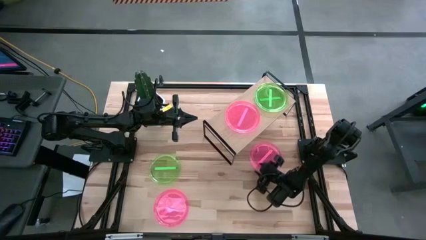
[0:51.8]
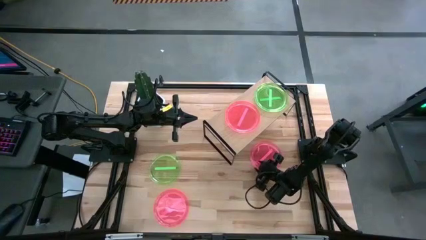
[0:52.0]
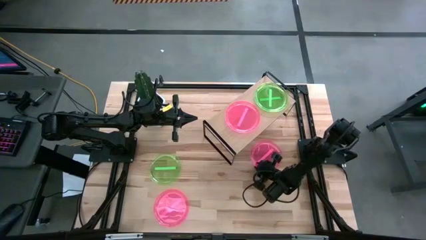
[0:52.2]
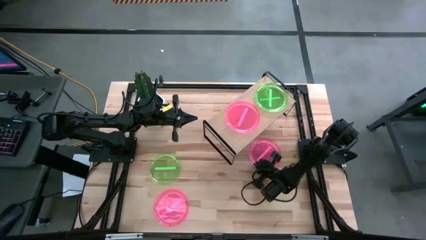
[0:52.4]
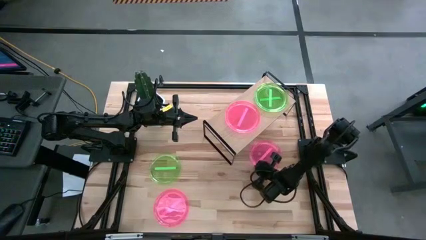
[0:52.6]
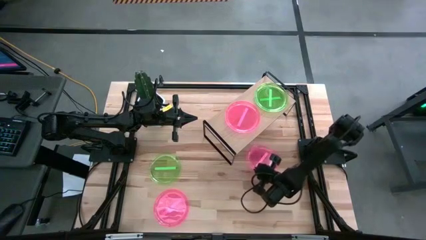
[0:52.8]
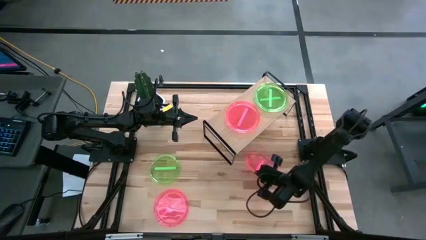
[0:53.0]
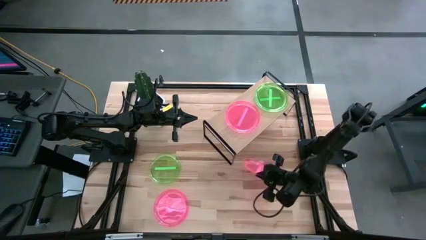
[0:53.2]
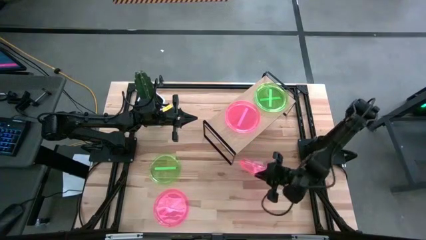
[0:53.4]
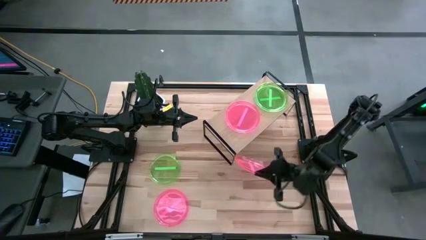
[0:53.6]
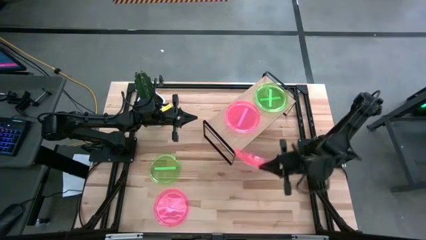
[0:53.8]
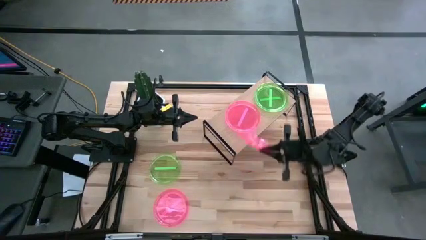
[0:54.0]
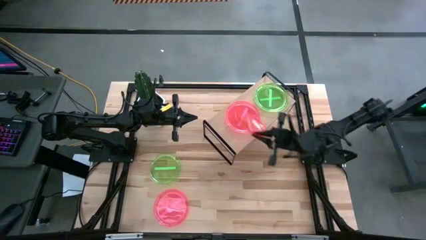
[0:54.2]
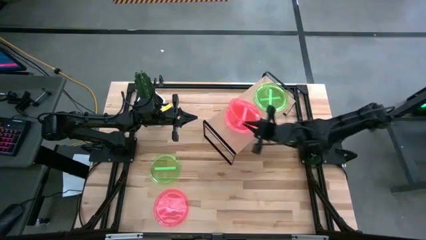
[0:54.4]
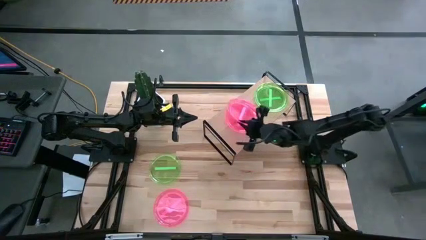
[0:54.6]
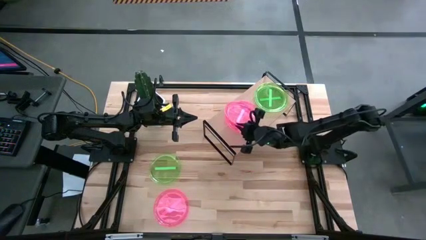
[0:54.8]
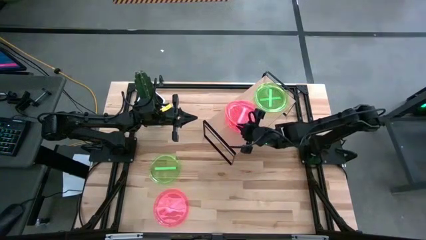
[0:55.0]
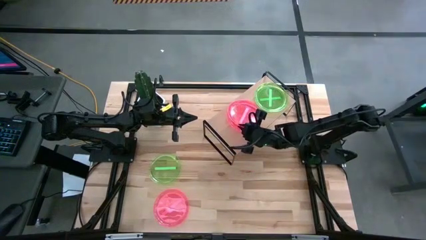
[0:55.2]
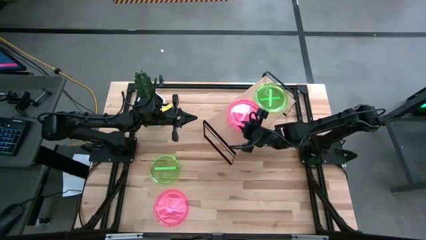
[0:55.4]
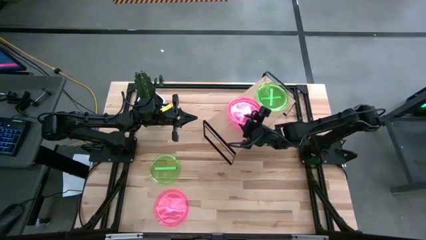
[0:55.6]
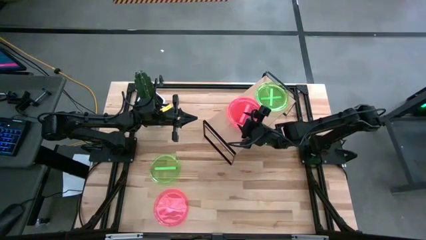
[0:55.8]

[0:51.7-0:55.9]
Task: Place and stack plates onto a shelf
Stack the right pink plate on top of the pink plate on the shelf

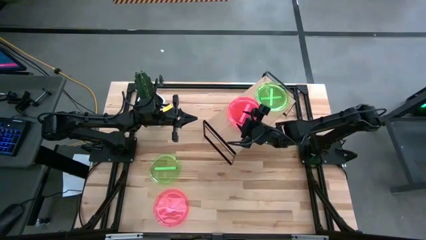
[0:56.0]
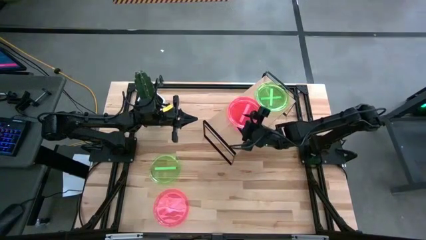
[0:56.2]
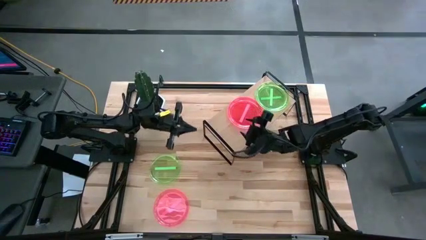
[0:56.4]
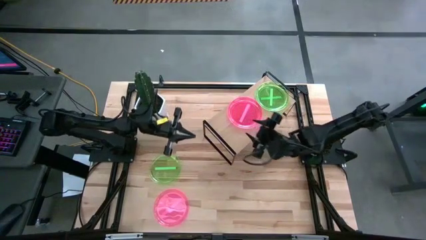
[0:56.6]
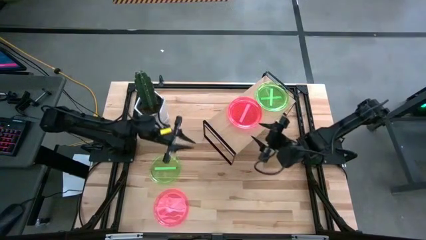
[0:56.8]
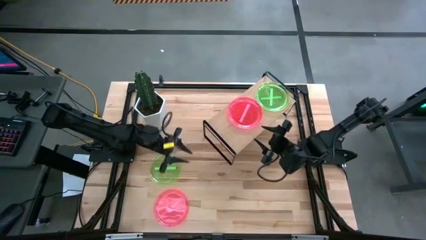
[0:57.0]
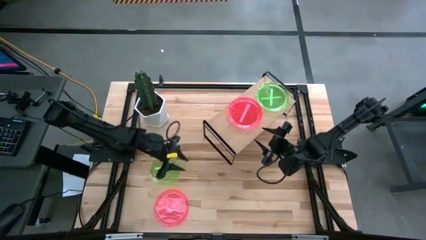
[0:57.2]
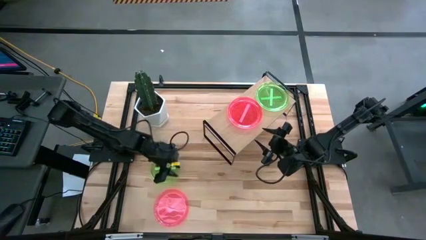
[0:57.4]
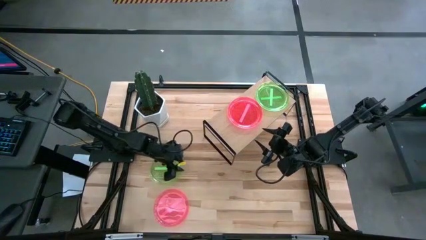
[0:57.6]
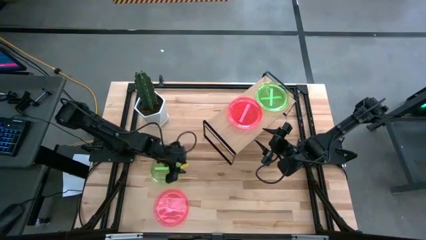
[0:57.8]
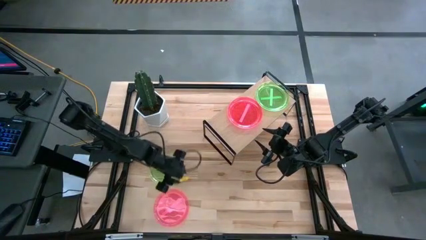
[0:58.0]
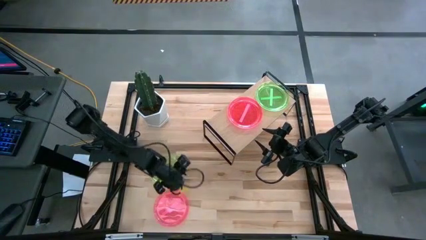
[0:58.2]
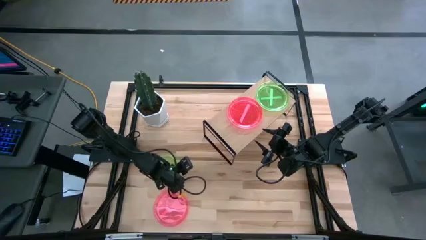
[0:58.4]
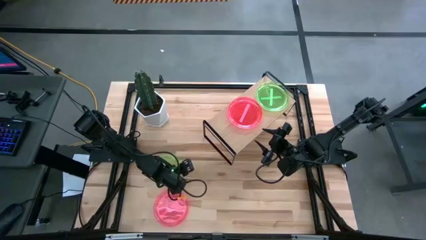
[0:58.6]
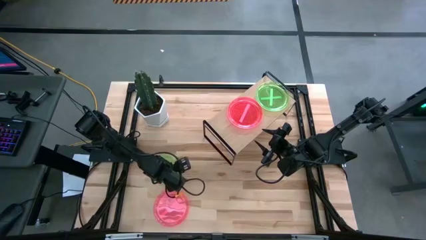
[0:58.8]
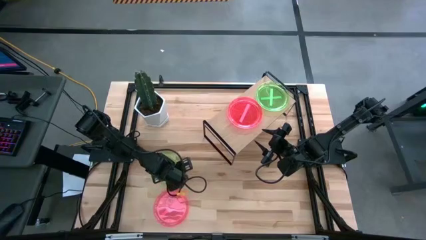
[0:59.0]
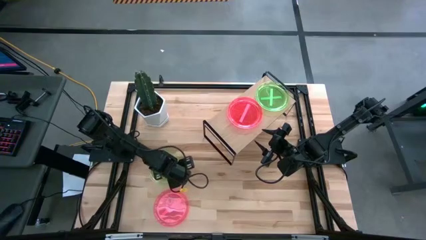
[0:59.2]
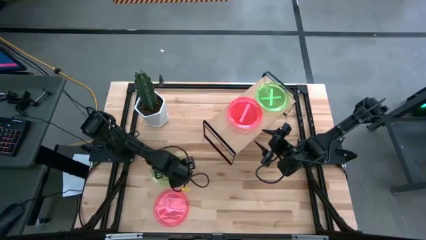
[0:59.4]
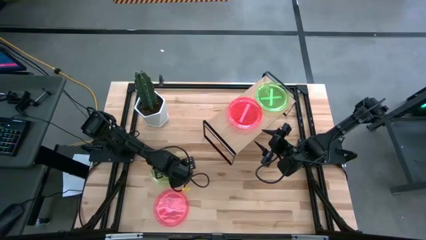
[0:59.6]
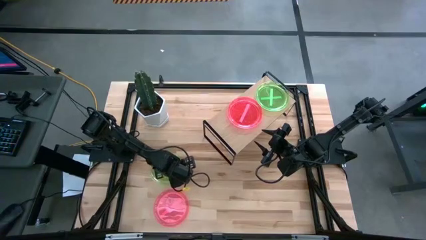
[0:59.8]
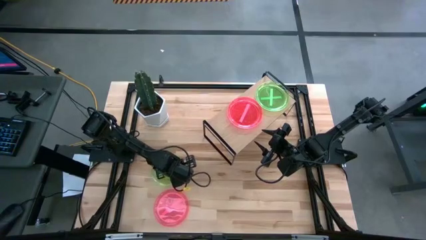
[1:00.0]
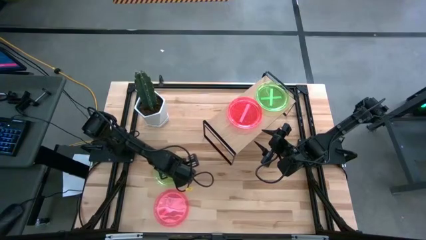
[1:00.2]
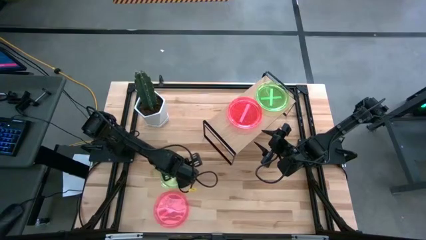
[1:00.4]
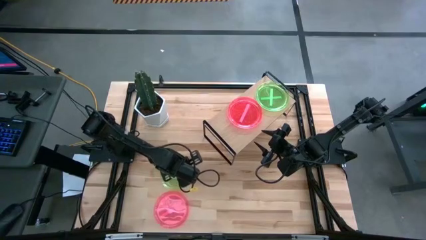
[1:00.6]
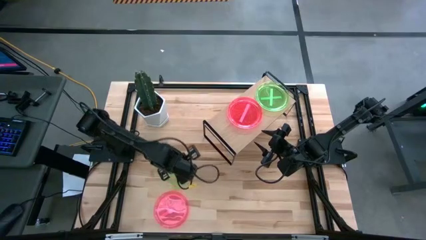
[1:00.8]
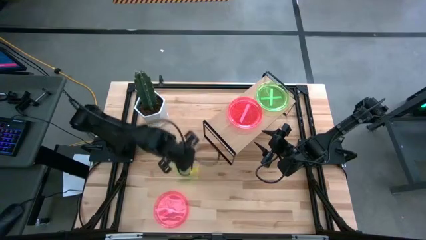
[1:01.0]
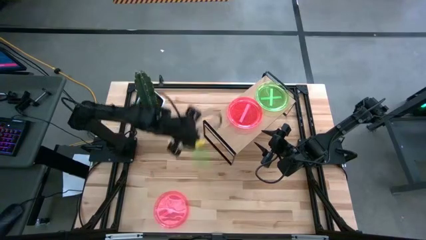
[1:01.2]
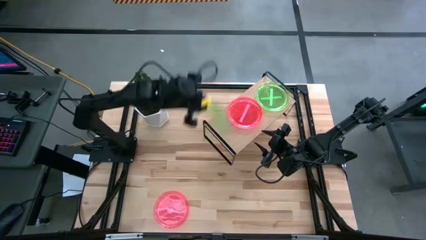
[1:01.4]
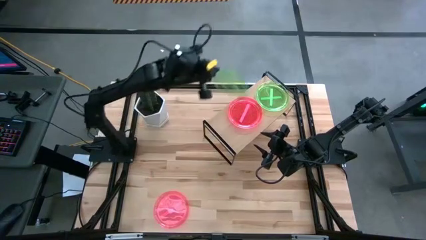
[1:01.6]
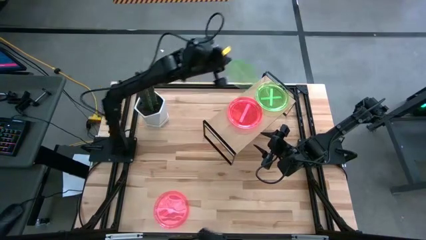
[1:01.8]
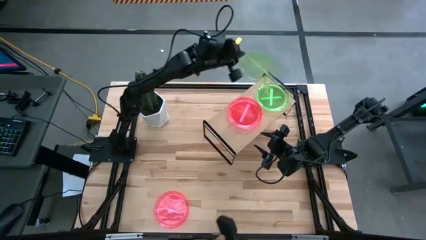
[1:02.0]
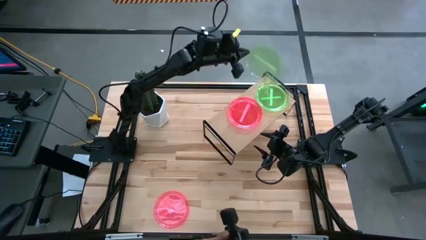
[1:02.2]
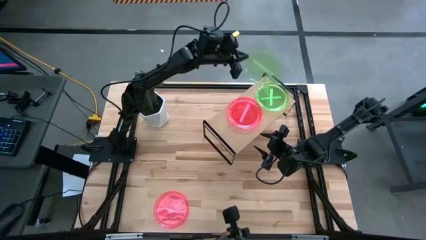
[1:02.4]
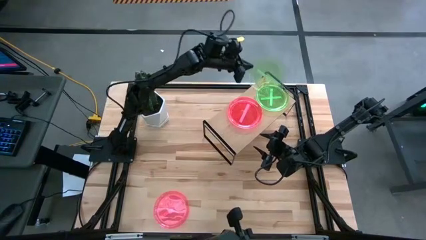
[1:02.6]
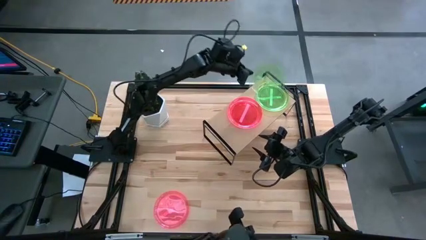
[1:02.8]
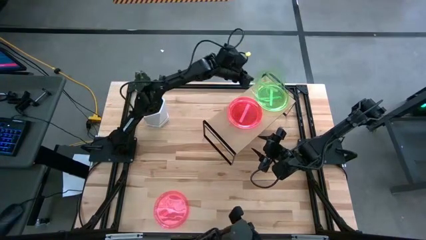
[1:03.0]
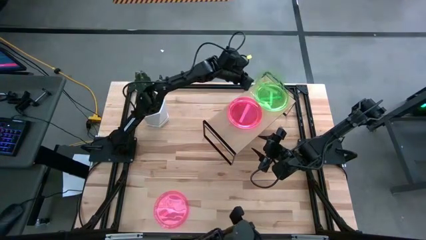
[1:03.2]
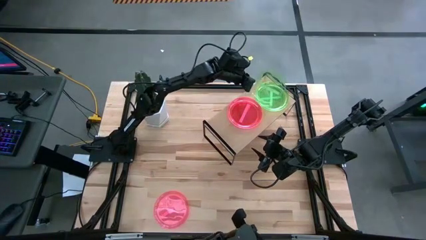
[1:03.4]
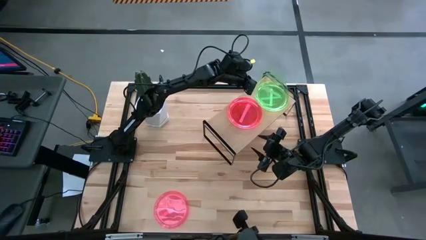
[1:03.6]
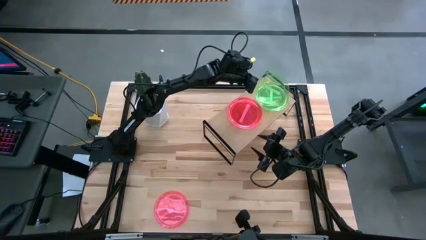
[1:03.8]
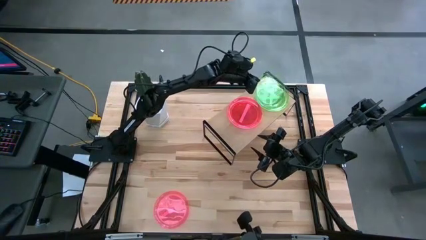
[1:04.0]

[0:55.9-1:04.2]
Stack the green plate on top of green plate on the shelf

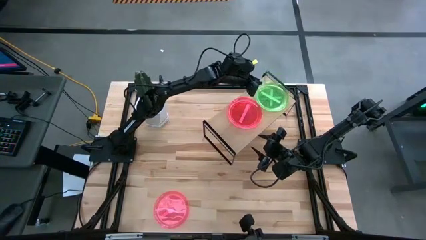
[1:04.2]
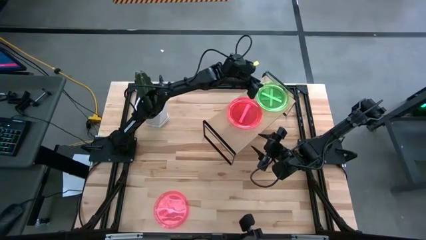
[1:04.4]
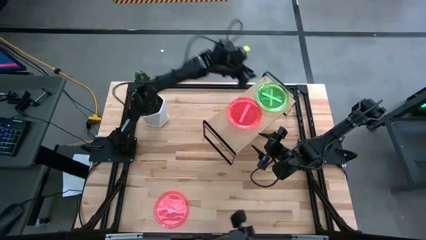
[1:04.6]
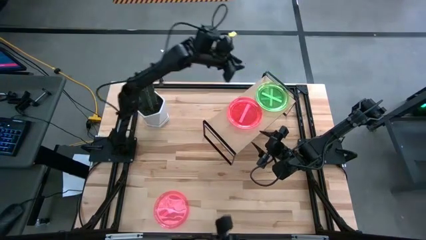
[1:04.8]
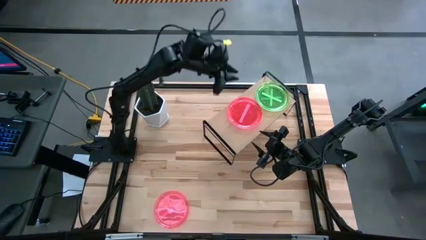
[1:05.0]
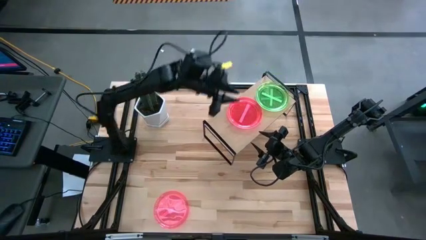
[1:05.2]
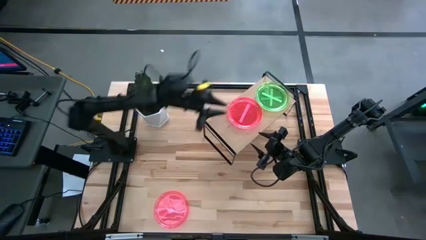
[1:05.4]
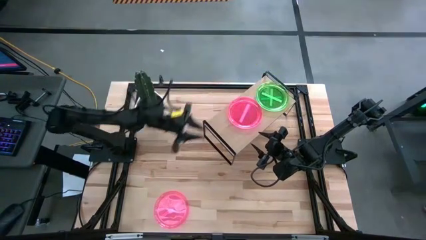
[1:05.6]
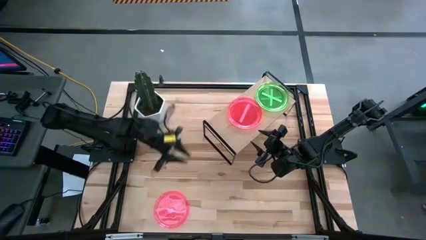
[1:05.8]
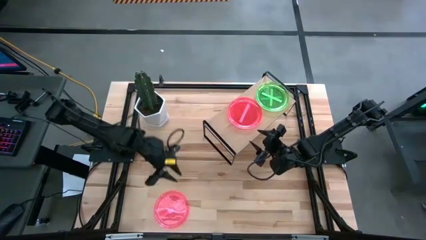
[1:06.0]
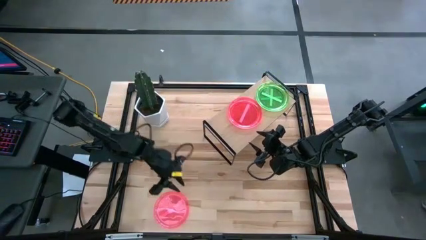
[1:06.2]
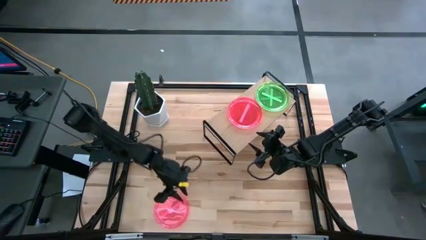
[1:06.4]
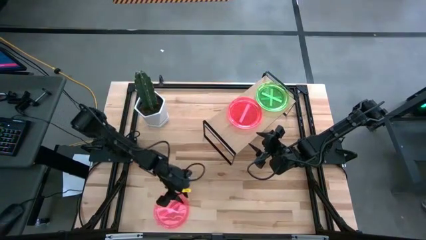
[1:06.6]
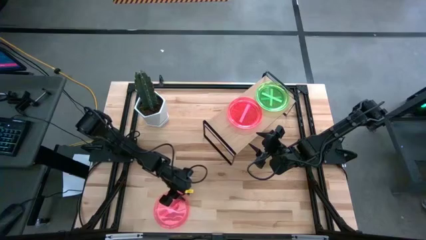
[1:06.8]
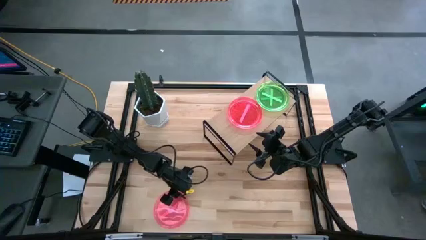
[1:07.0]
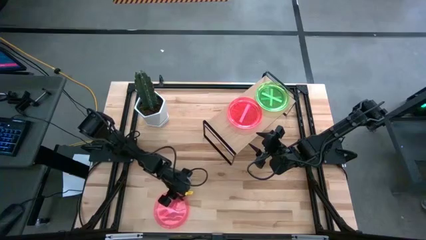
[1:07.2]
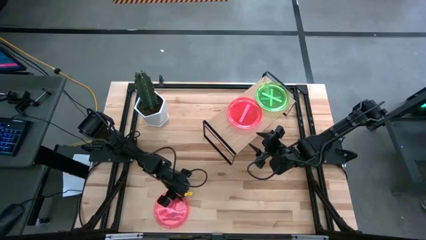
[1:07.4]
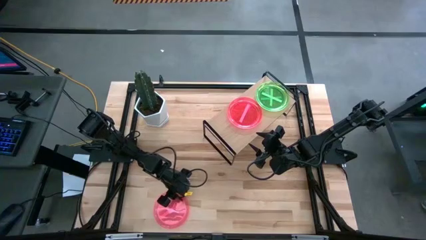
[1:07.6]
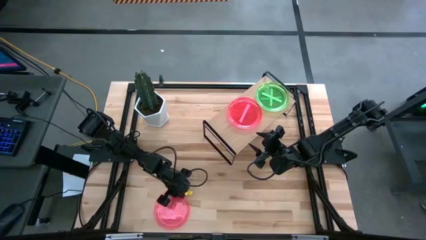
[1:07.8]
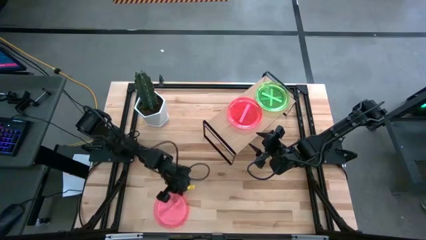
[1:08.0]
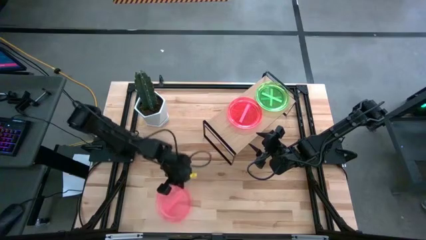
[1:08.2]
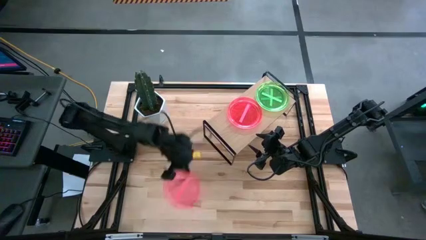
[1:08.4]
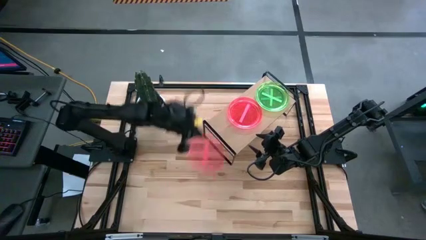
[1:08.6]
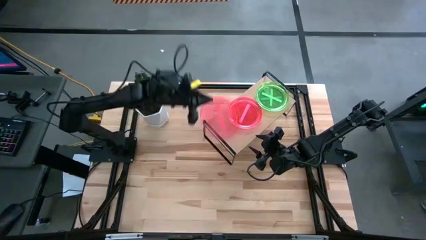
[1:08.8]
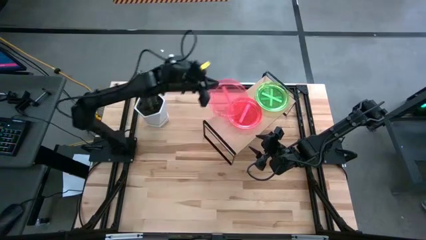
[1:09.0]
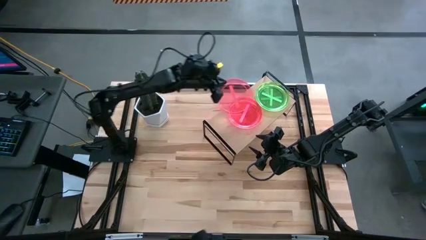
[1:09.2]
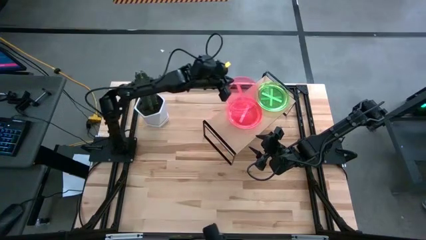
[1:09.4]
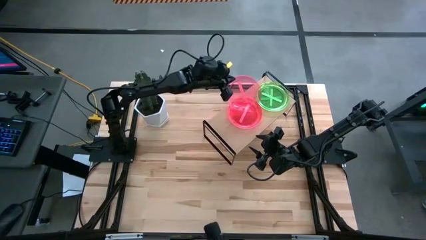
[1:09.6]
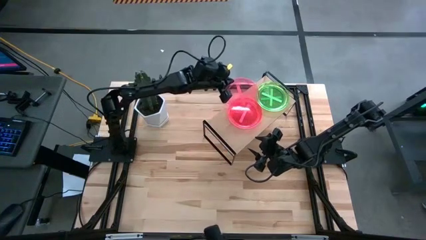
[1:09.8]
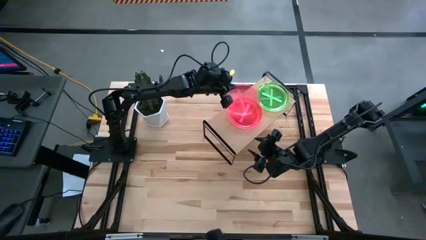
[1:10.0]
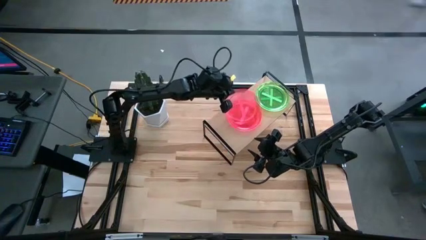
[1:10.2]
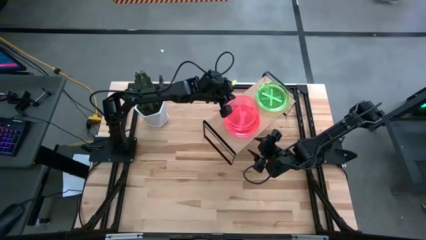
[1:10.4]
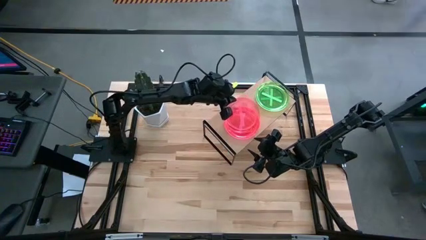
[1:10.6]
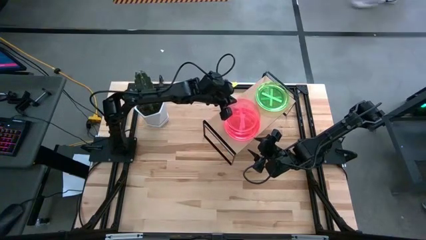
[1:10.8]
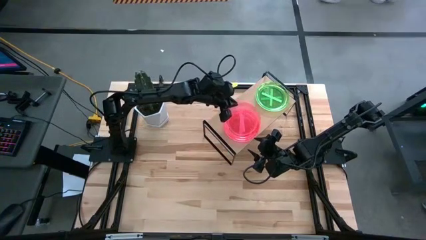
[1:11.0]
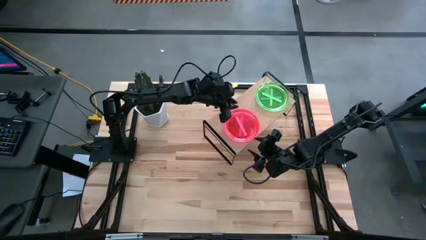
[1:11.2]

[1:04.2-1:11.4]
Stack the pink plate on top of the pink plate on the shelf
